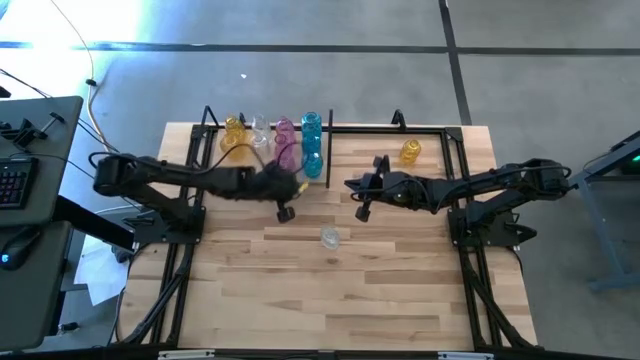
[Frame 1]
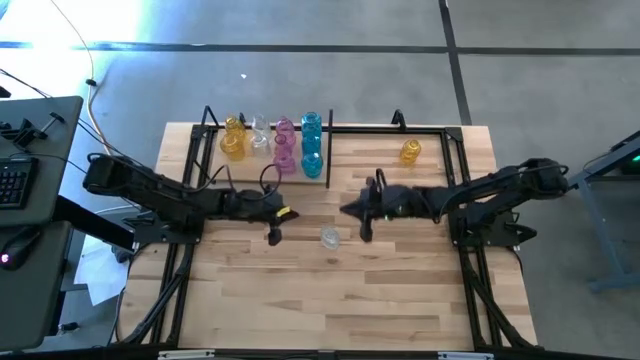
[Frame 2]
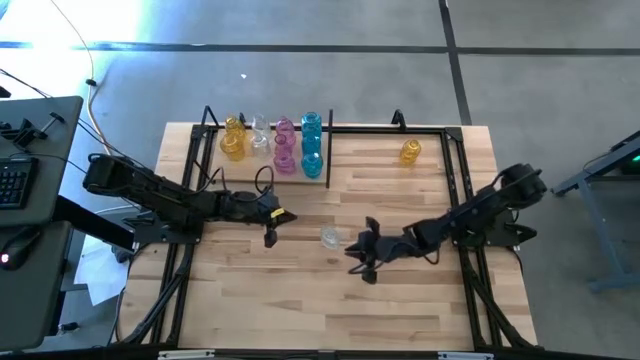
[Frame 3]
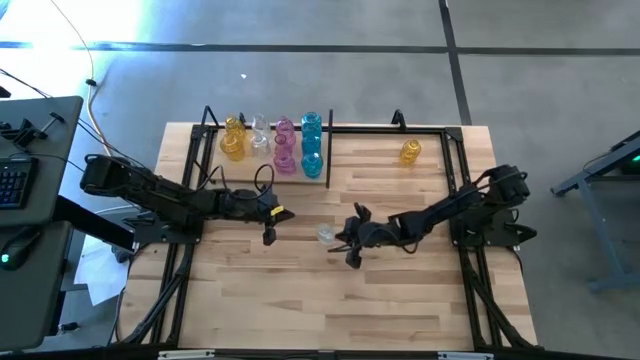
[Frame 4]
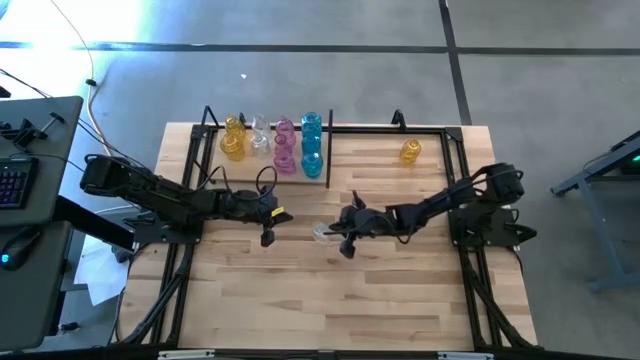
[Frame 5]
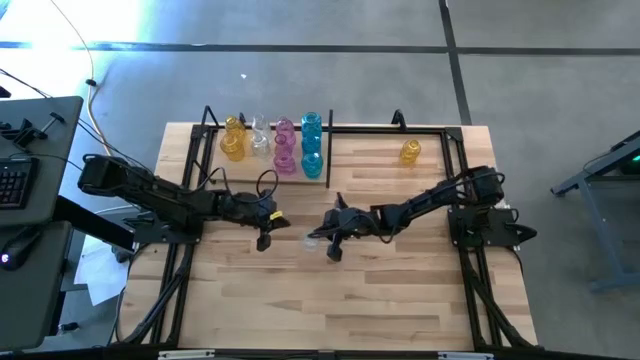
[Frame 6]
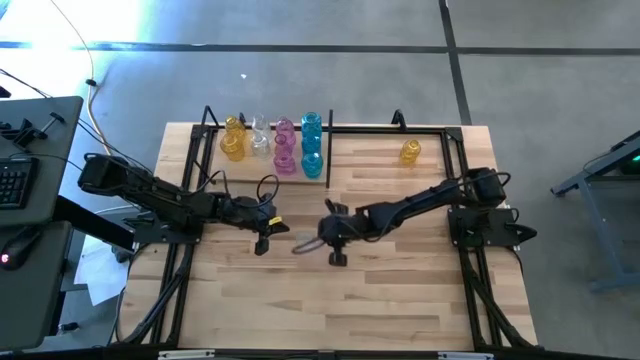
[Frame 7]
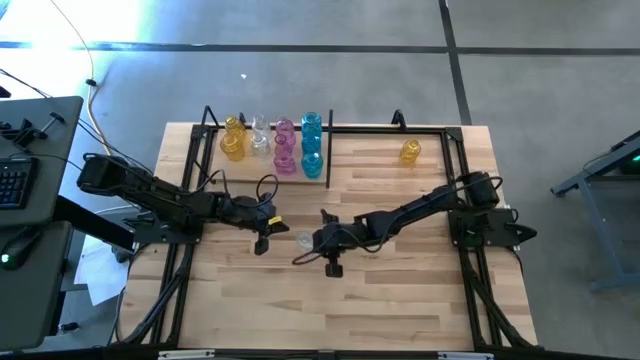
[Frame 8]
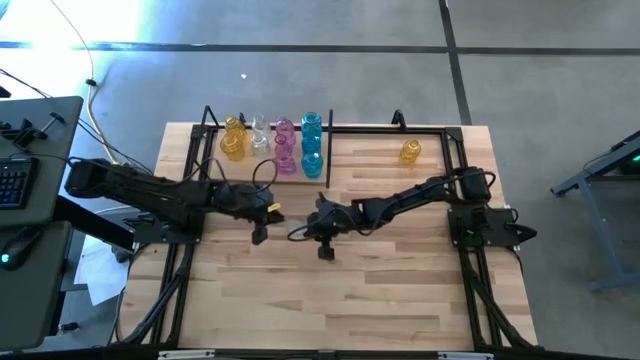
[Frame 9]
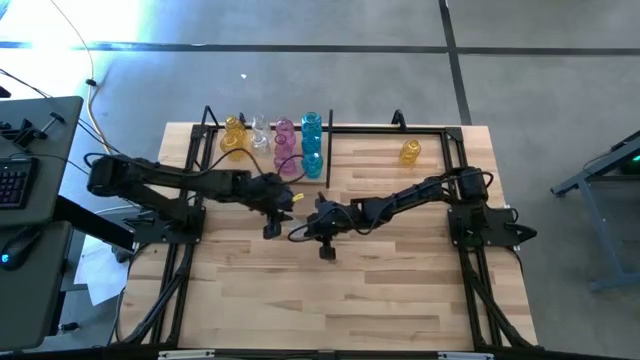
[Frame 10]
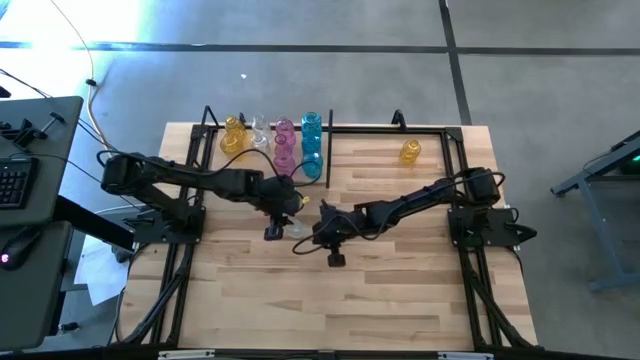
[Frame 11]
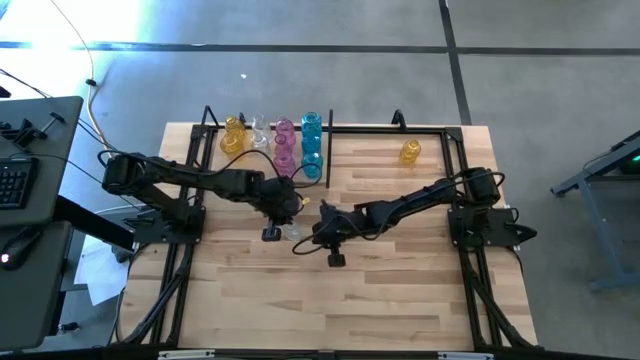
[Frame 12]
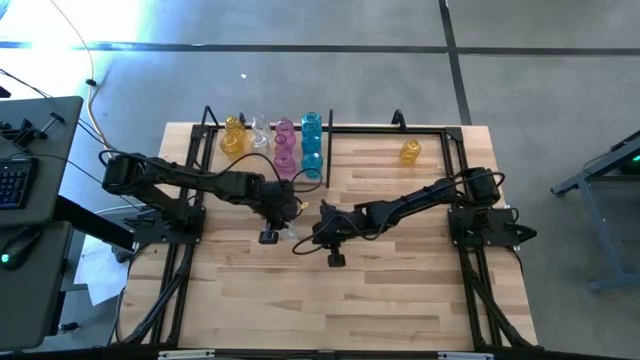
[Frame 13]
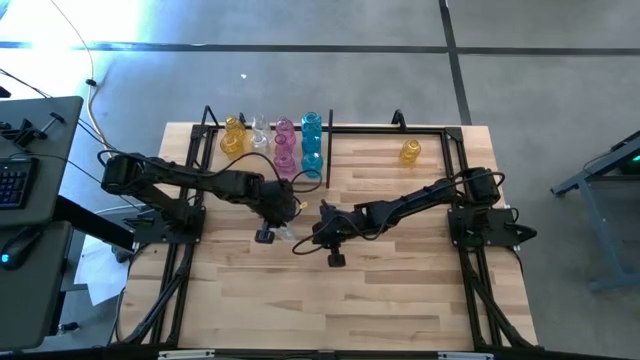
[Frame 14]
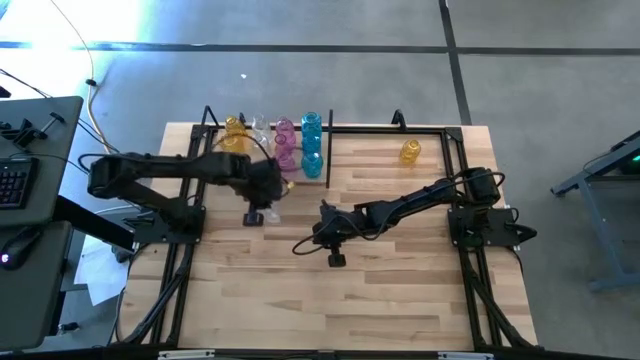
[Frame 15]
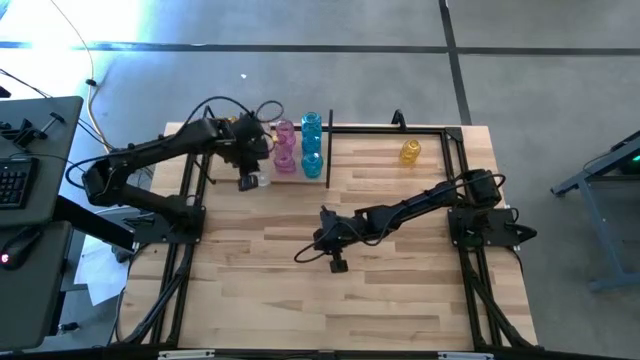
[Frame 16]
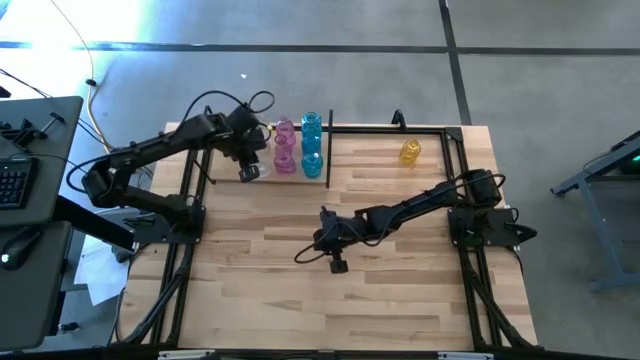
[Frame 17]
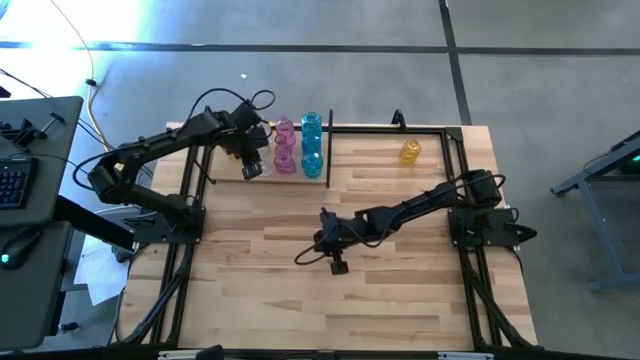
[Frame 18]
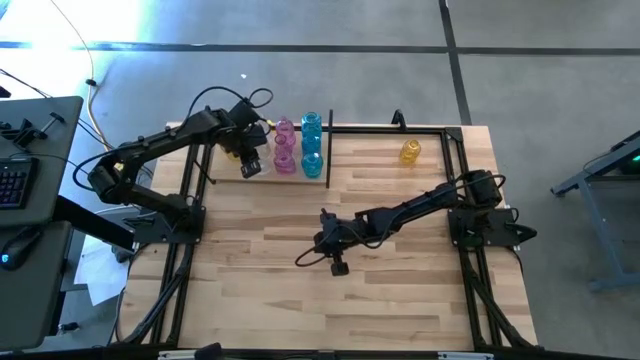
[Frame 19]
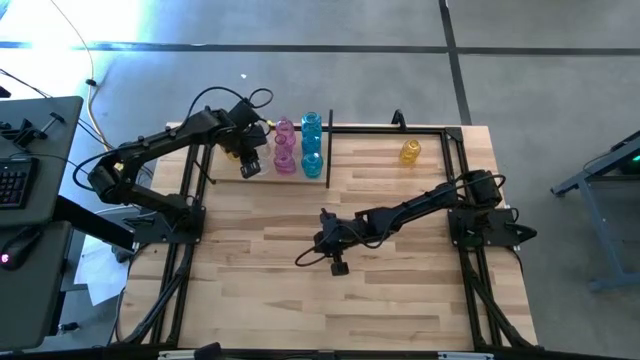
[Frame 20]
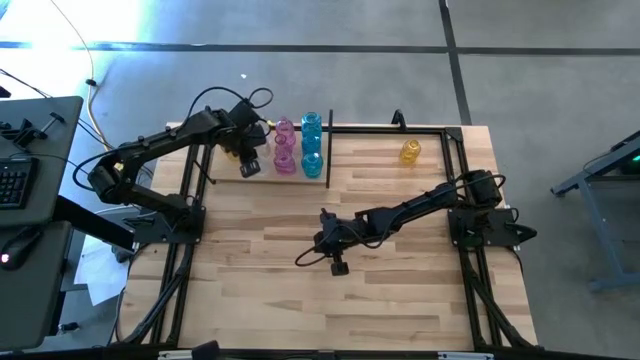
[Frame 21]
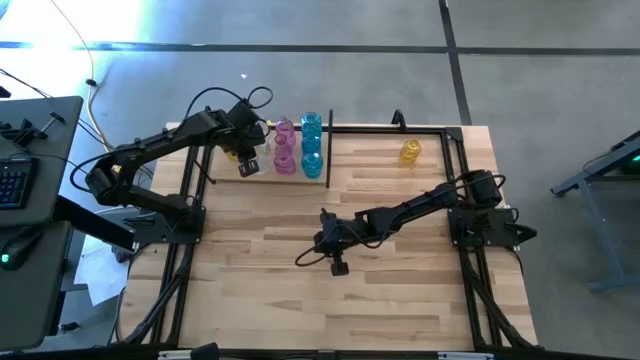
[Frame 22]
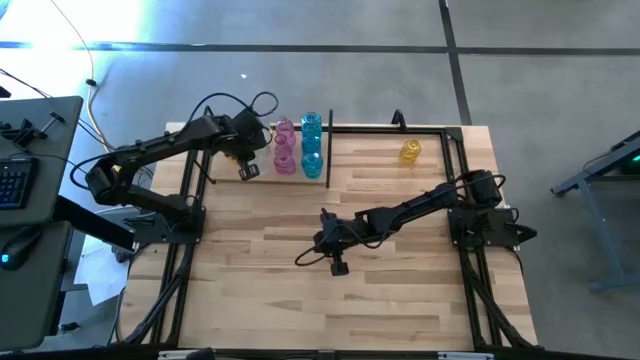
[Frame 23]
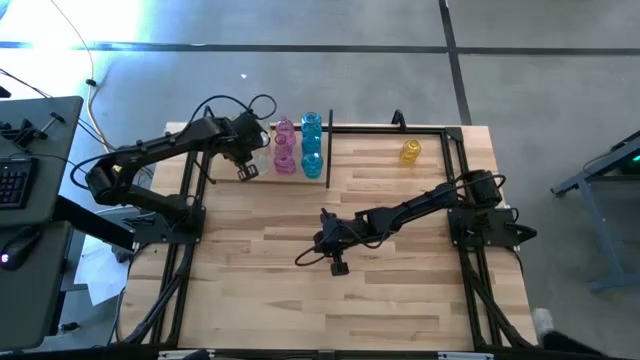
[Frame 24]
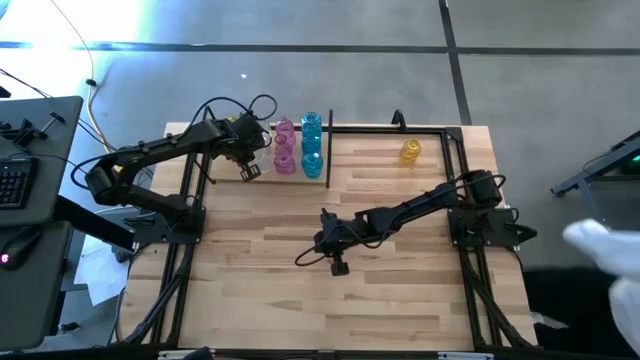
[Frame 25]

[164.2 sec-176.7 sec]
Task: sort vases onto shelf
Put the transparent flower vase aligned with the other transparent flower vase on the shelf

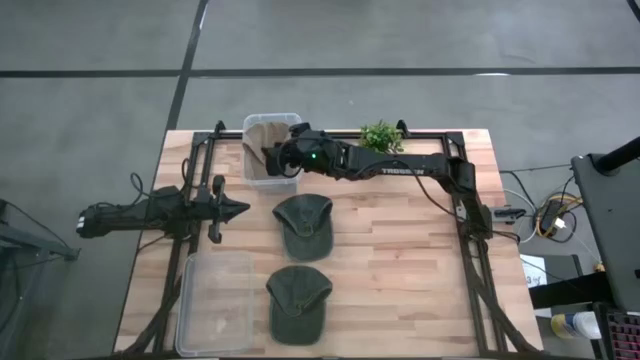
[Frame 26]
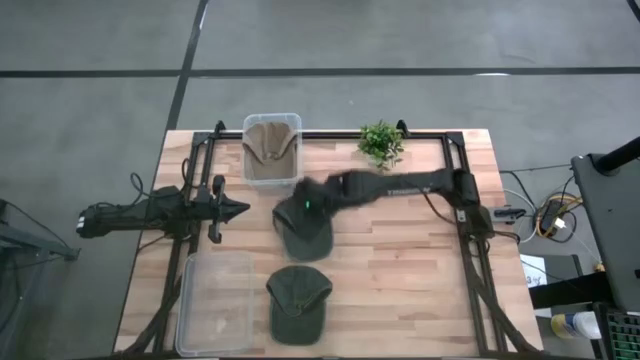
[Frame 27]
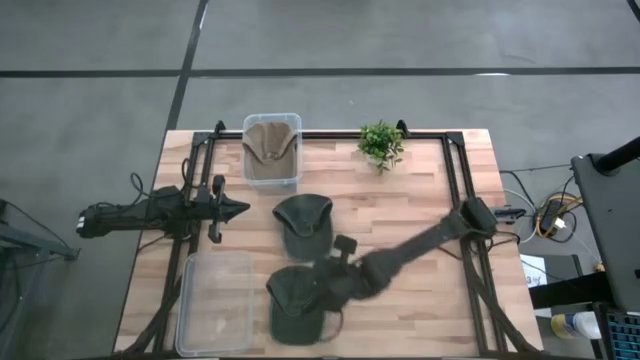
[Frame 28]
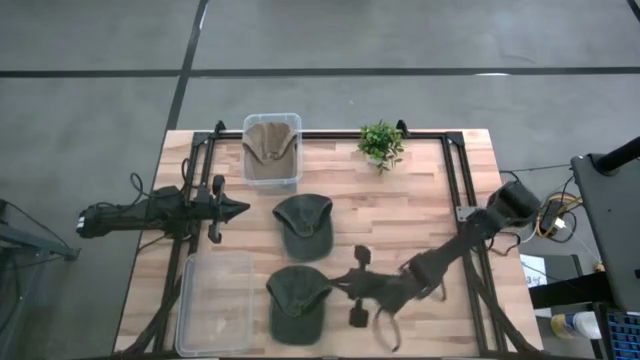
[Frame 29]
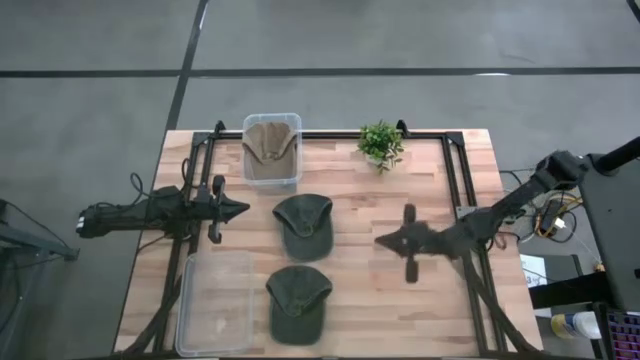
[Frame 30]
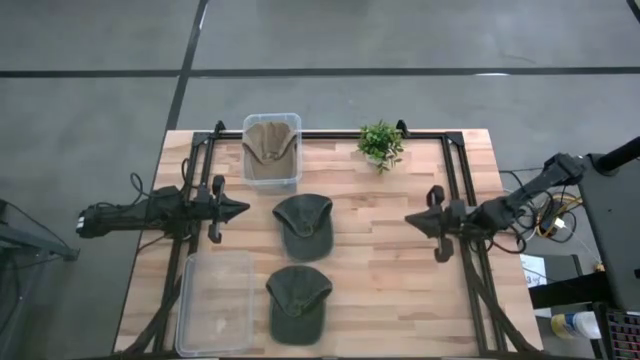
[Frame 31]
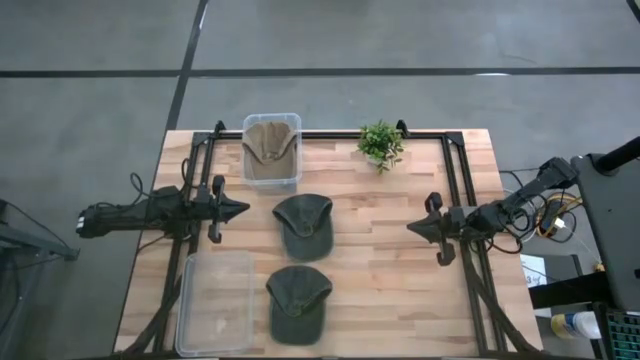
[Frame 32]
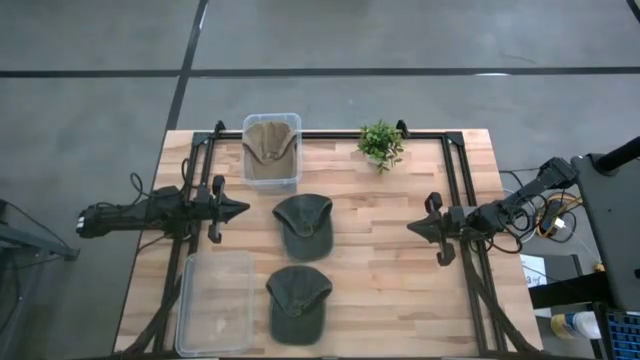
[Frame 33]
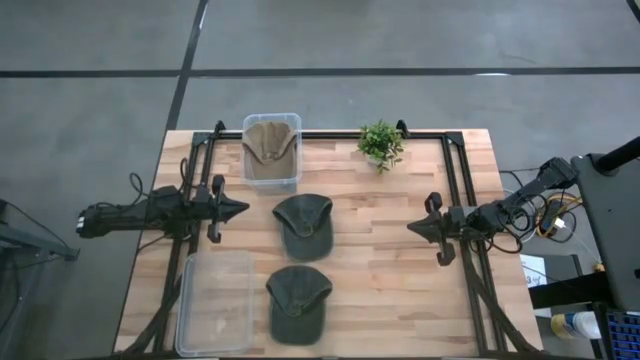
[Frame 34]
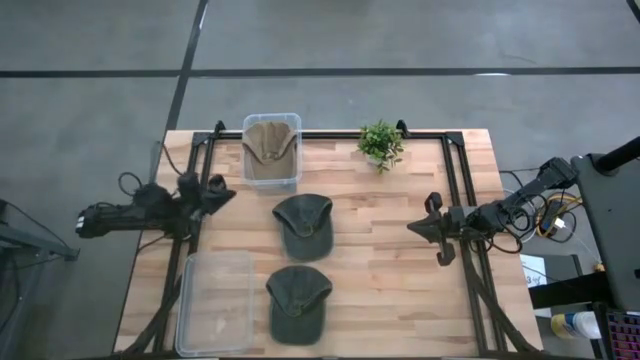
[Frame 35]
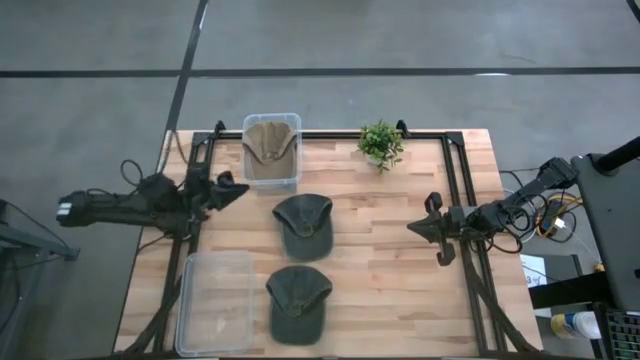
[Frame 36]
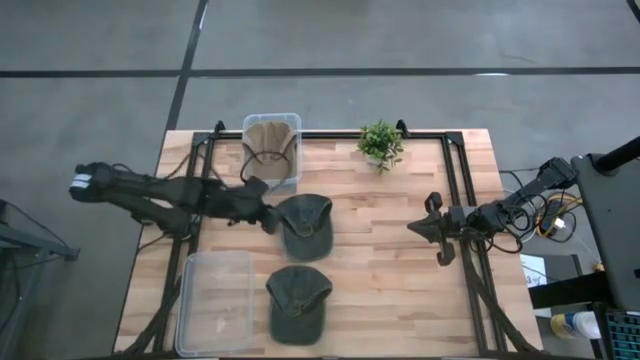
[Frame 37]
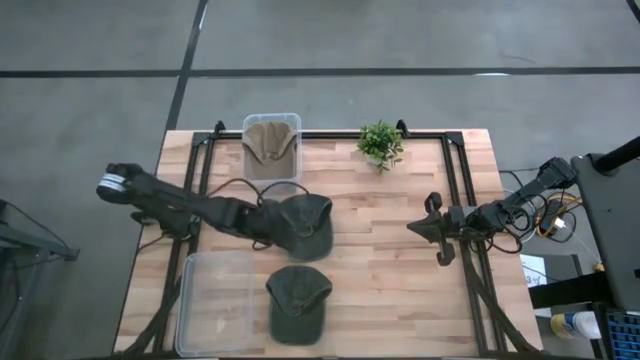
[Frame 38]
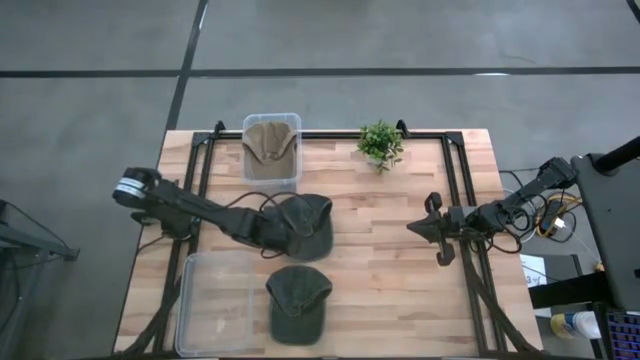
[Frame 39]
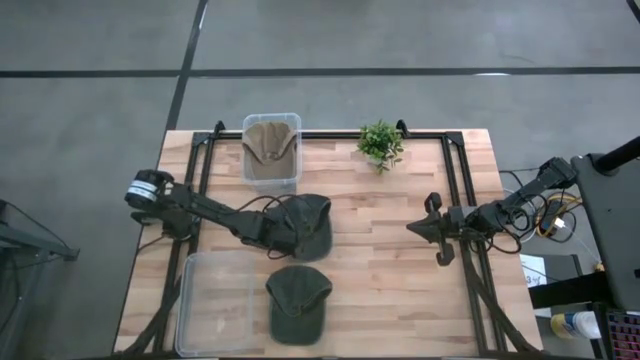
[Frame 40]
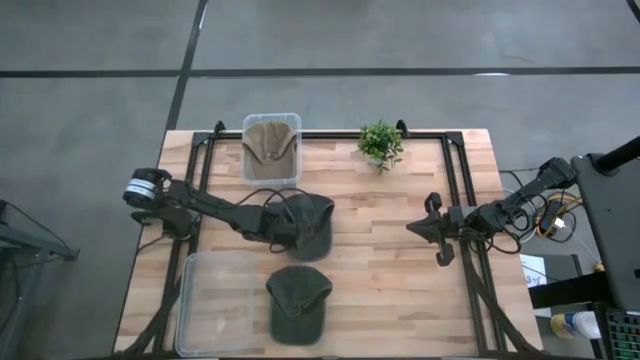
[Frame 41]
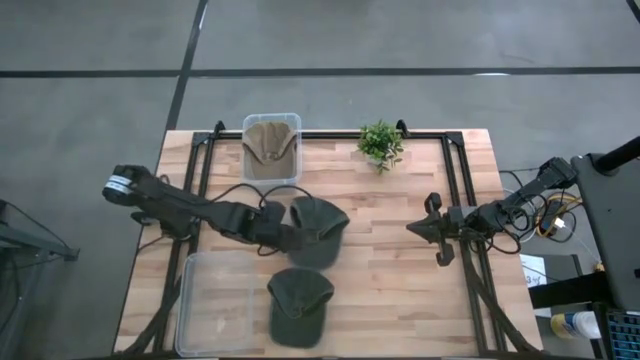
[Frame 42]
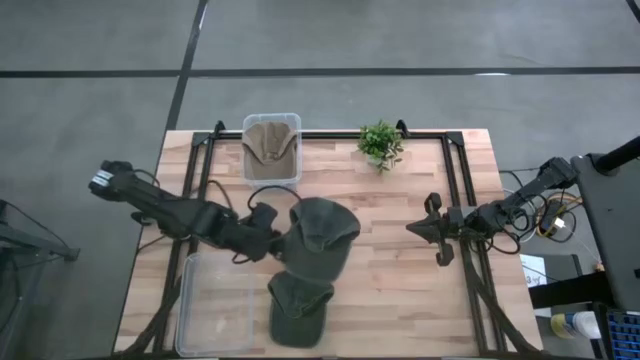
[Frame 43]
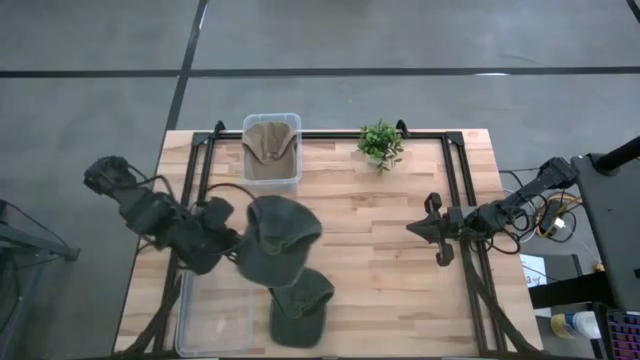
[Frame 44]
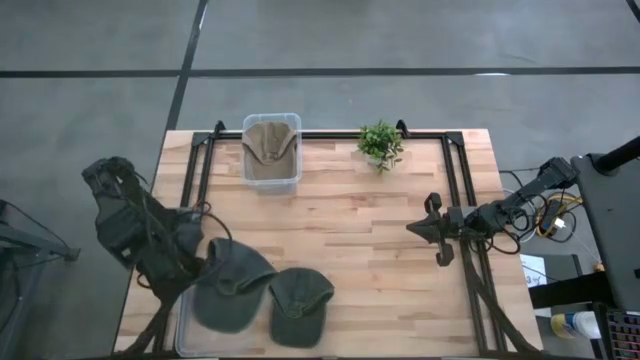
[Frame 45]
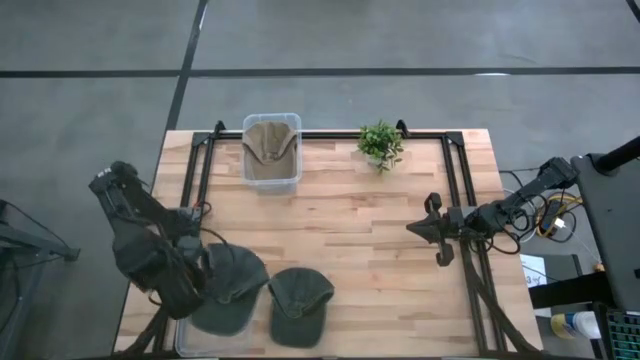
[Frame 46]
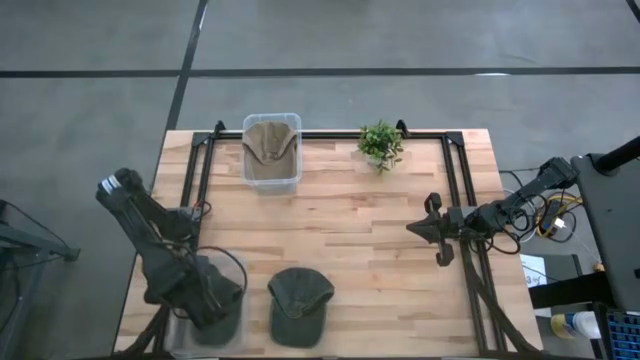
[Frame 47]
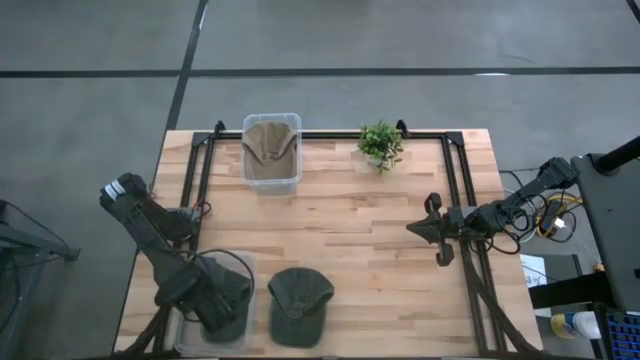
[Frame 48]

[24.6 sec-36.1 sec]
Task: Pick & Place hat
Put the top black cap into the bottom transparent bin
